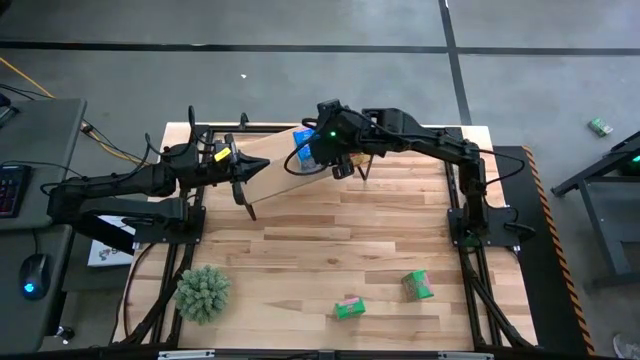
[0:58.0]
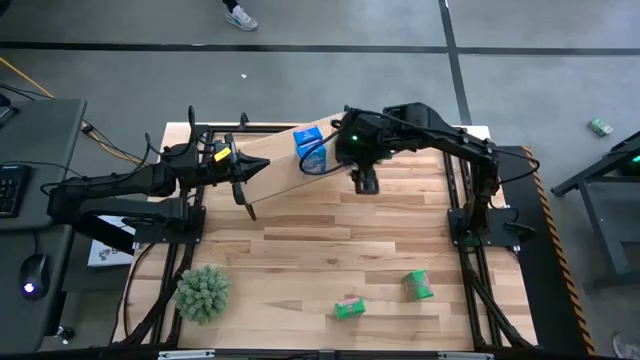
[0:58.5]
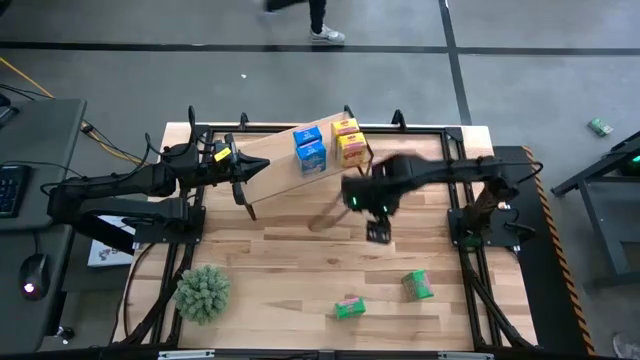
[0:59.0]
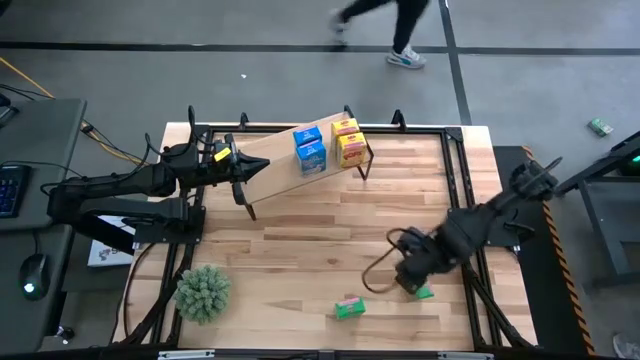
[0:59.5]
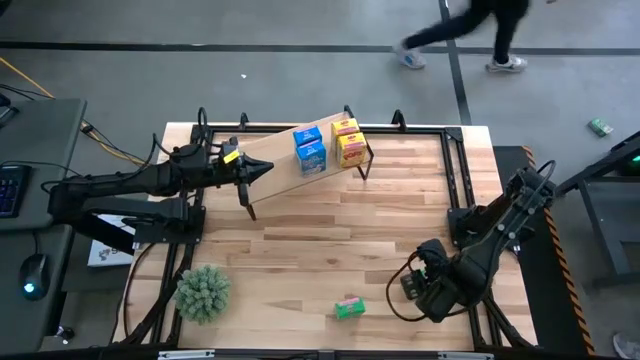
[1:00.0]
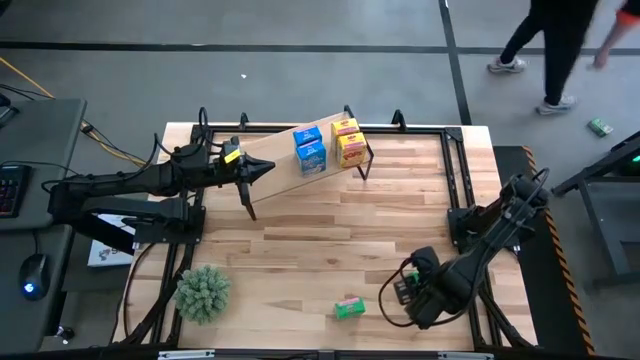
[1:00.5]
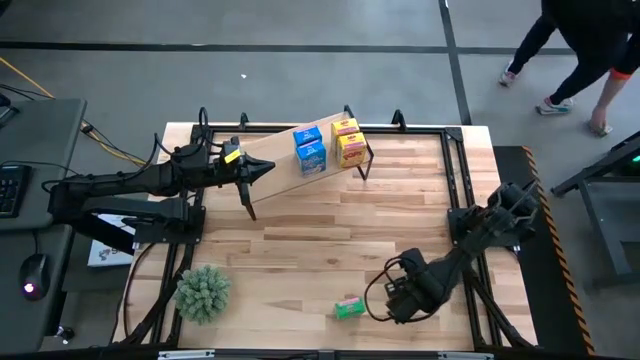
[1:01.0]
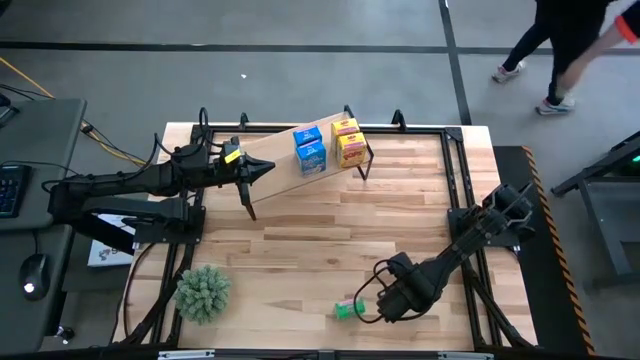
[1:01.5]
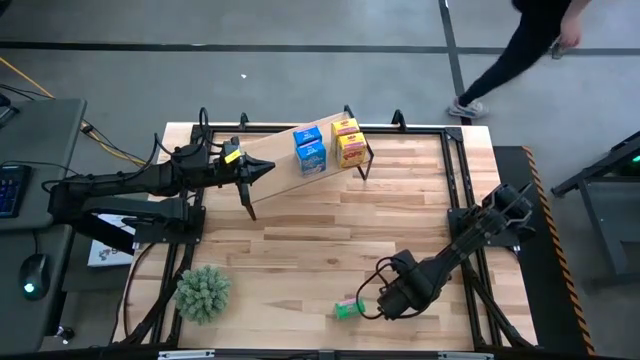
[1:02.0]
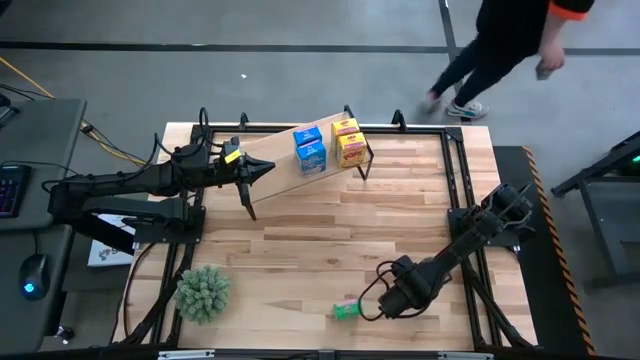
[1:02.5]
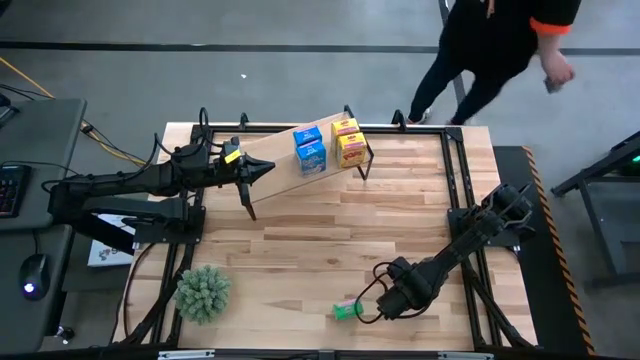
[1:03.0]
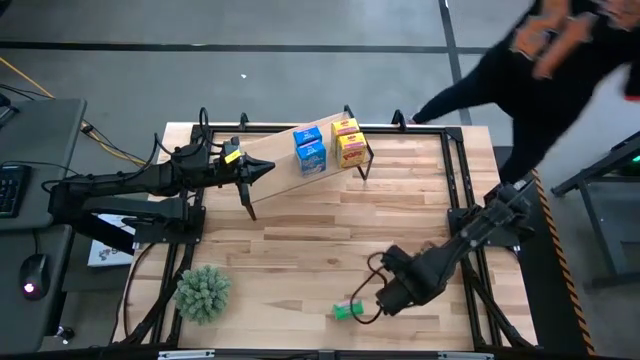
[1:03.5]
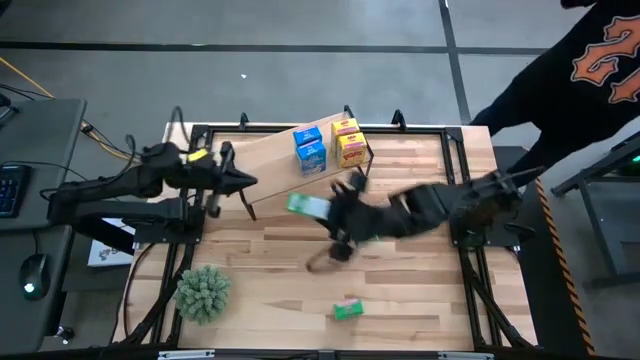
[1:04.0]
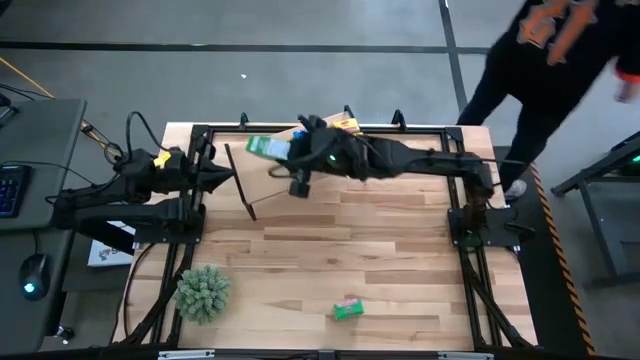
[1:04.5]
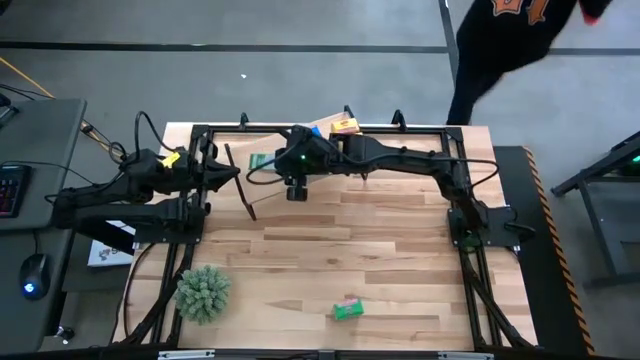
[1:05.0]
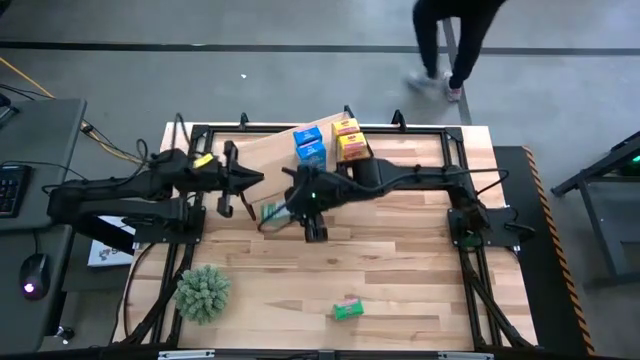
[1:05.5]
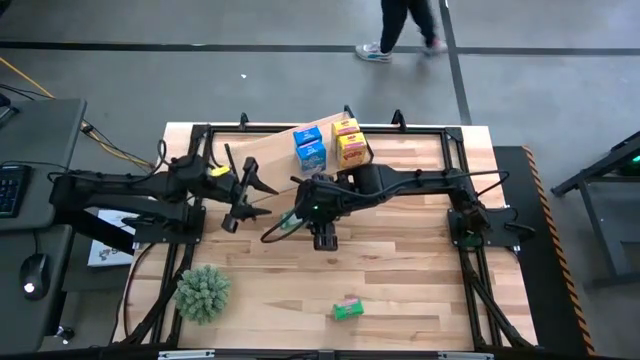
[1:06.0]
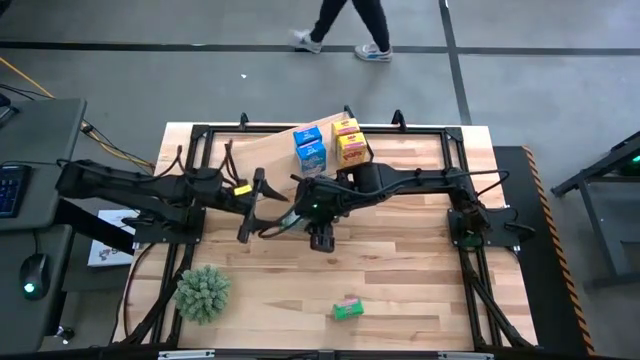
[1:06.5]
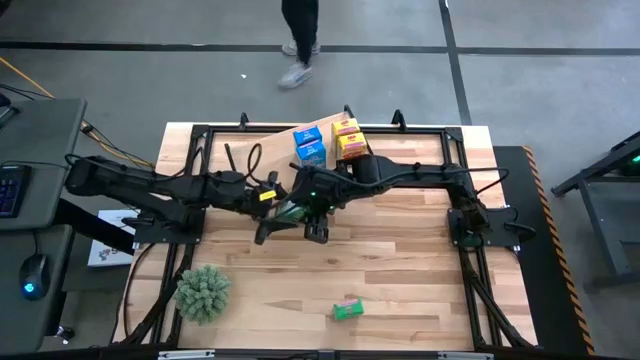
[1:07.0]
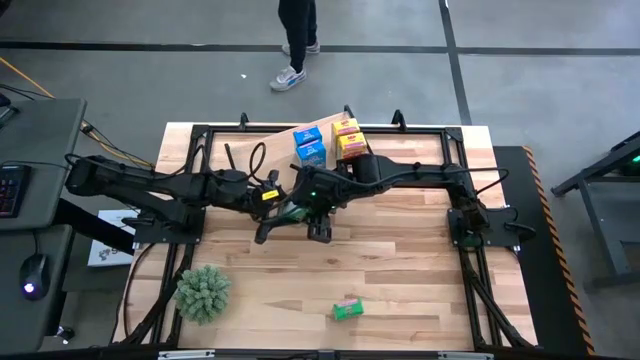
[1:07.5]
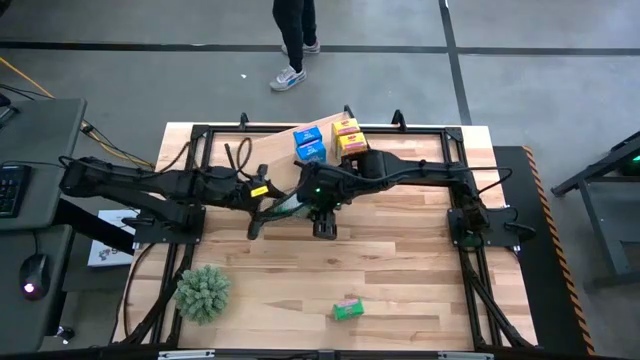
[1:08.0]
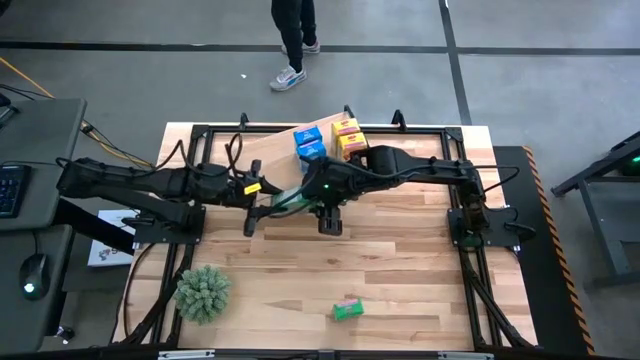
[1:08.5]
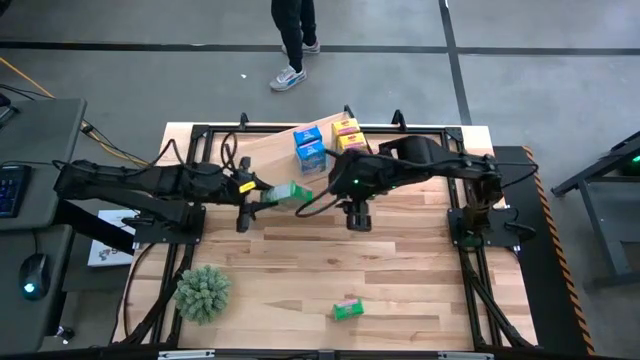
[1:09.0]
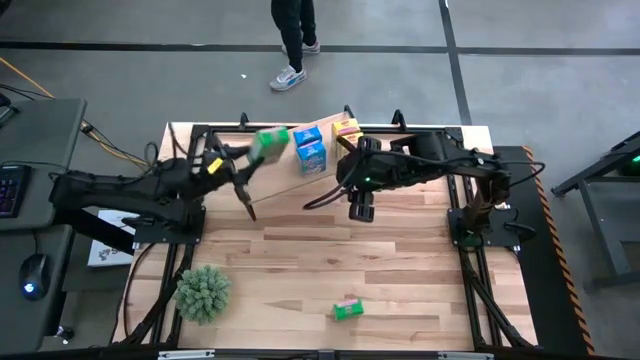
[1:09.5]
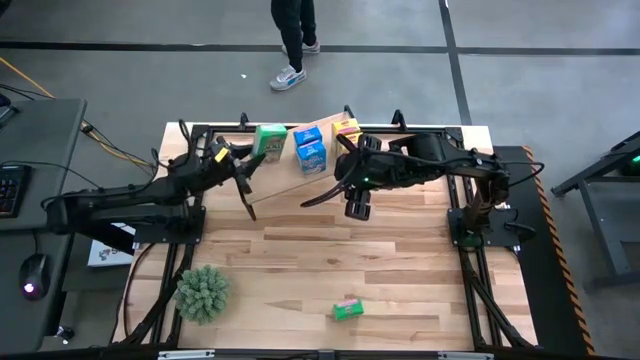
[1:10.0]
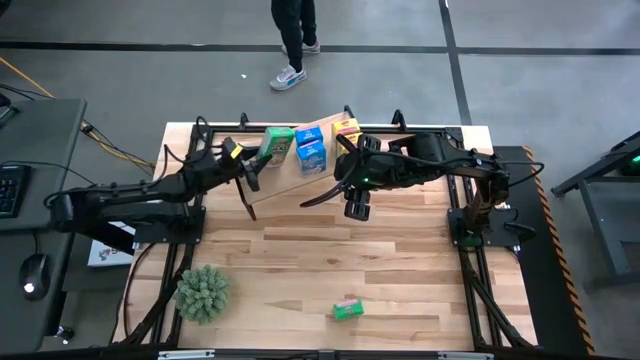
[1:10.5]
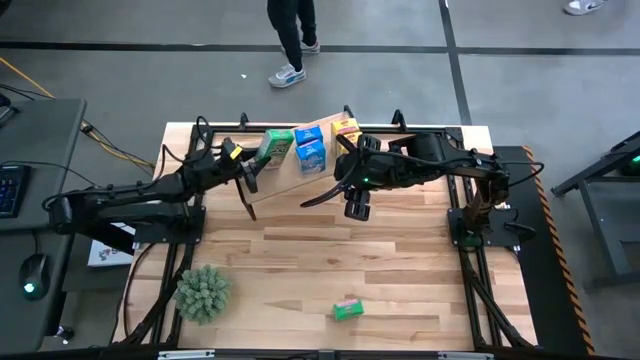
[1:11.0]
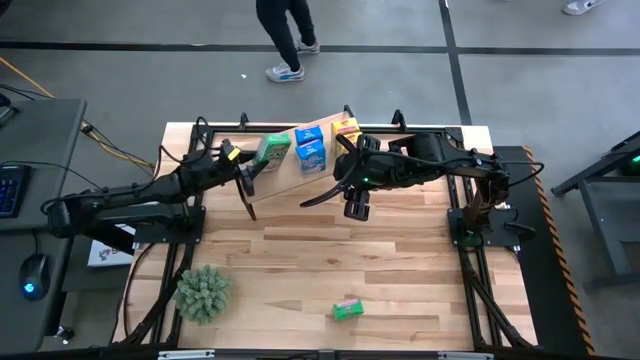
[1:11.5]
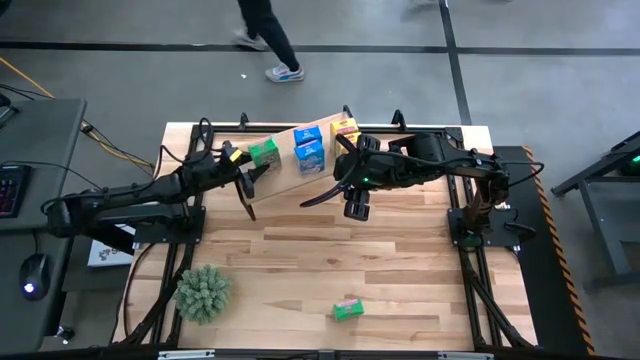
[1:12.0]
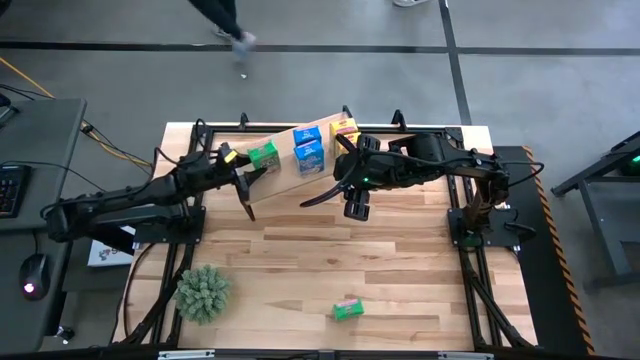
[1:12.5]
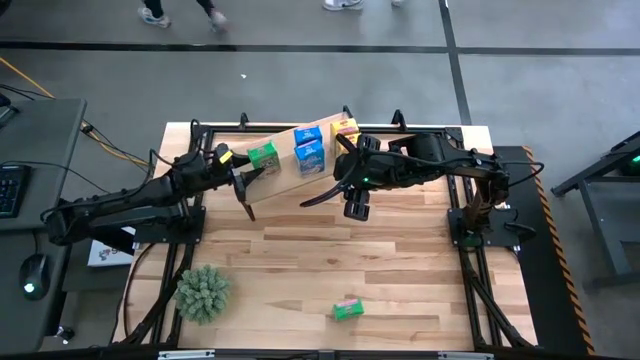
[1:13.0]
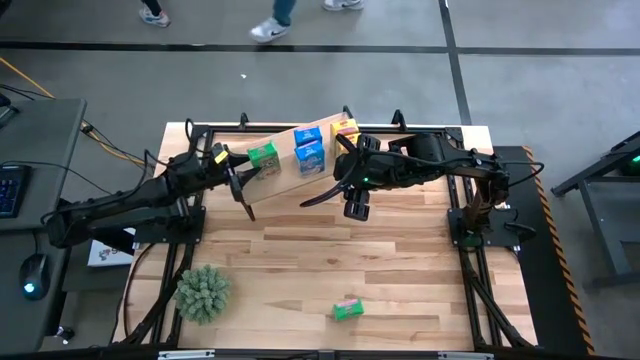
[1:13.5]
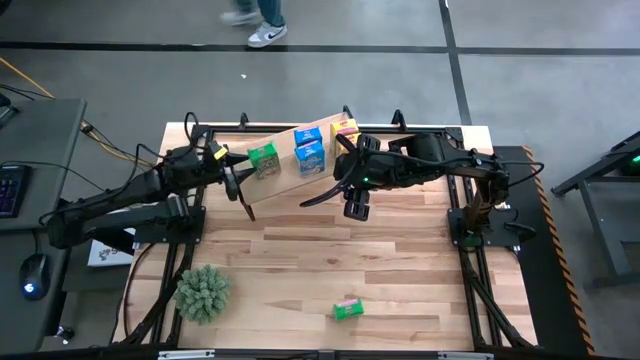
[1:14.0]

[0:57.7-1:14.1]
Task: Stack cereal on shelf
Put the green cereal box on the shelf

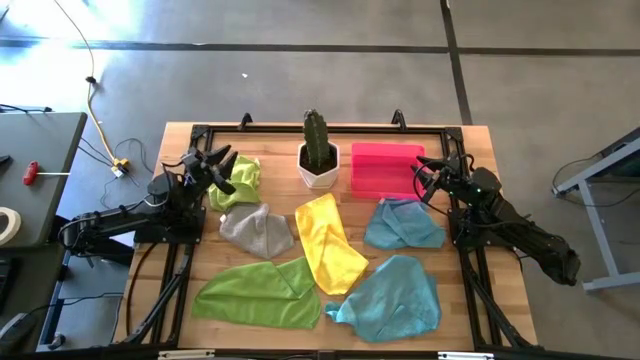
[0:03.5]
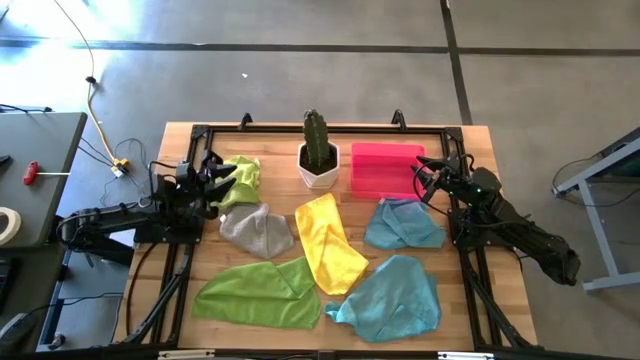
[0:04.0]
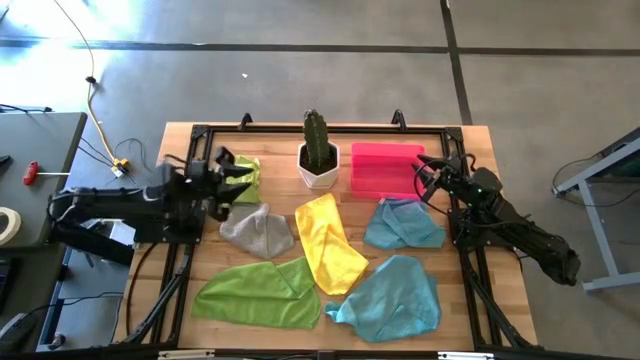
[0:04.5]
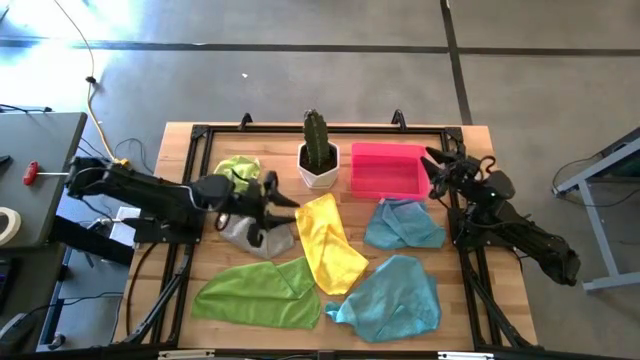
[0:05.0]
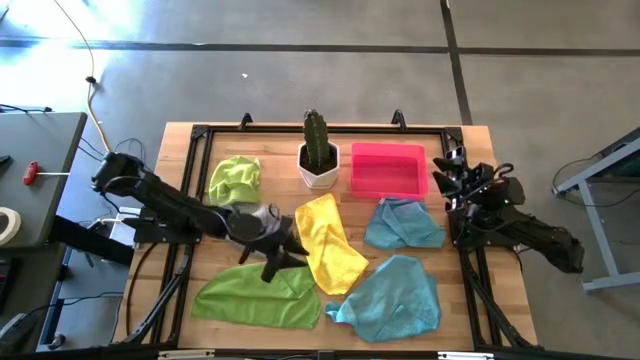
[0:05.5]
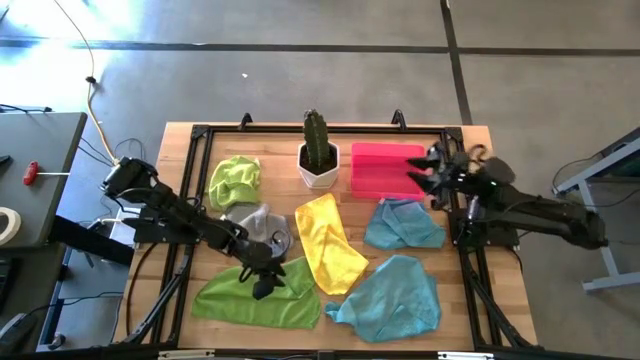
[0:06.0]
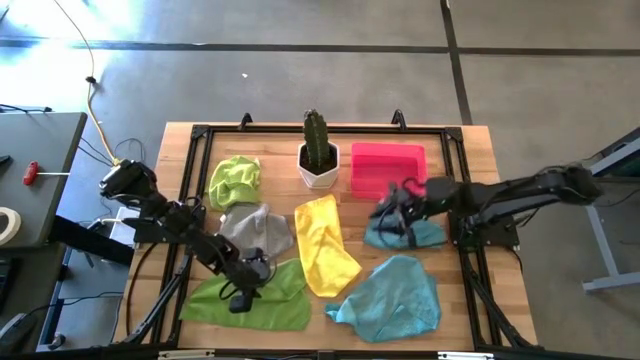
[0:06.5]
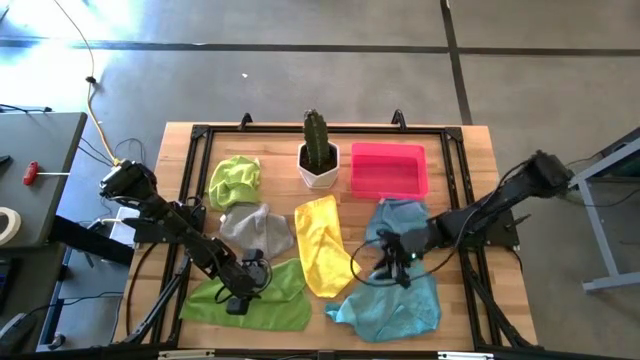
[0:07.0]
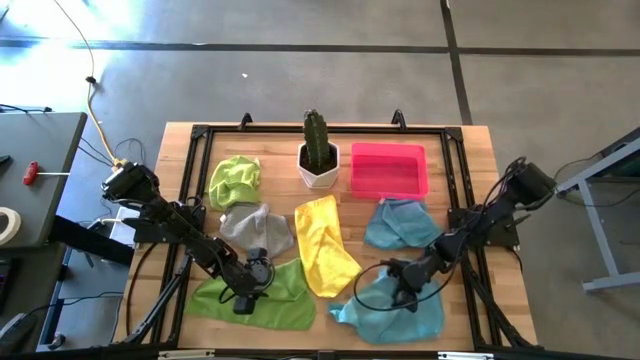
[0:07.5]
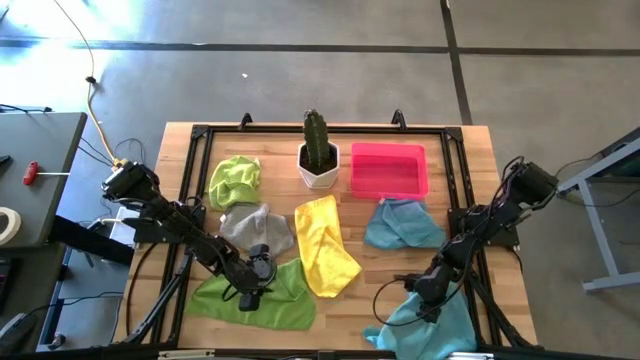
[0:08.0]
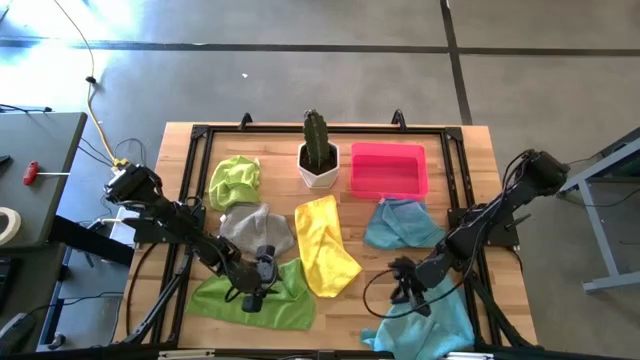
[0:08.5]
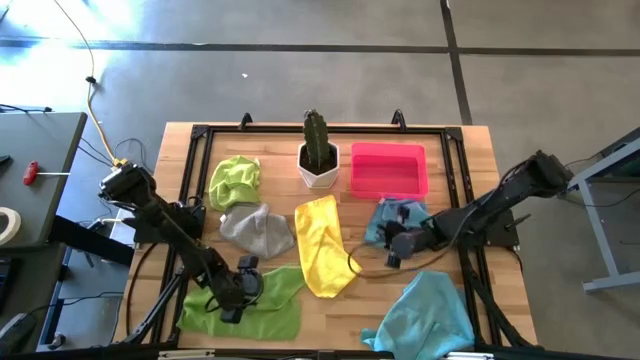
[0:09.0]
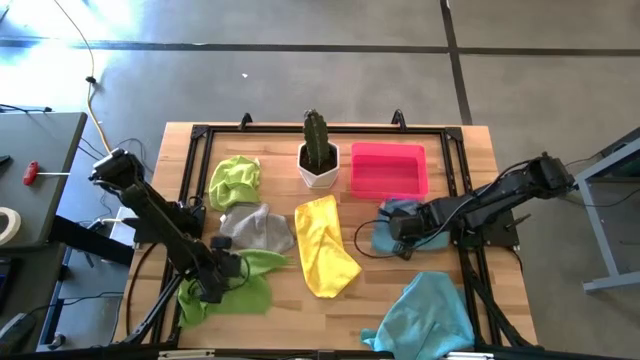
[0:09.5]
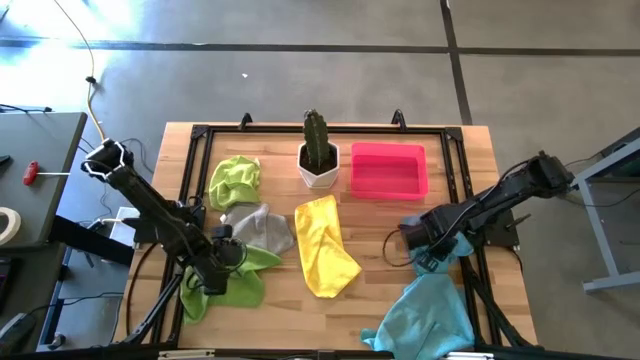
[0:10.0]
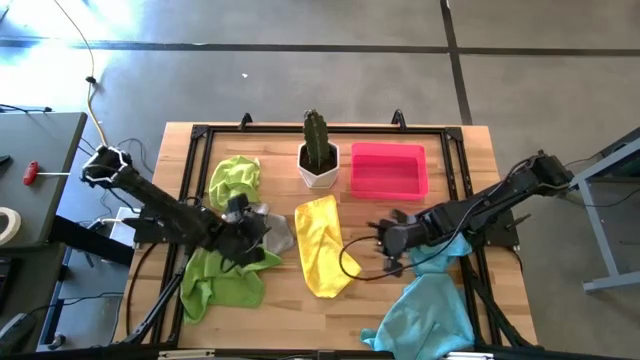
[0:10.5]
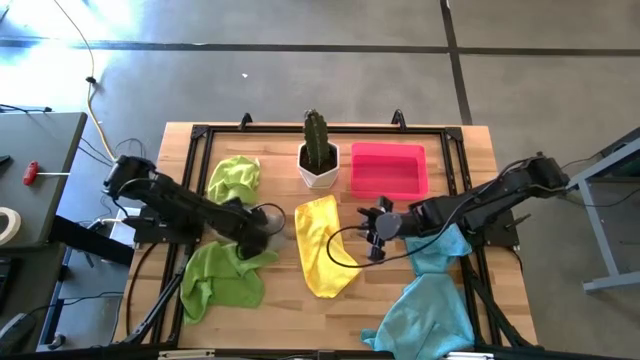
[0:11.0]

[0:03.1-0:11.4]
Task: Fold microfiber towels
Adjust the microfiber towels
